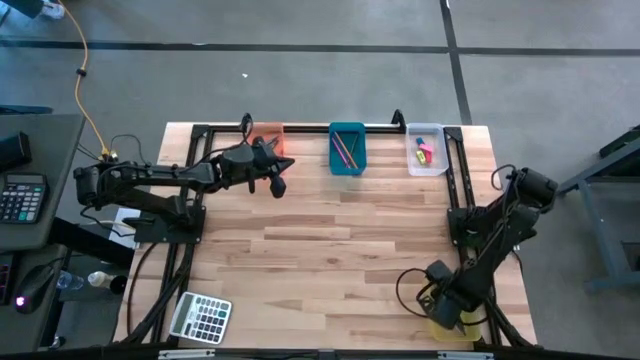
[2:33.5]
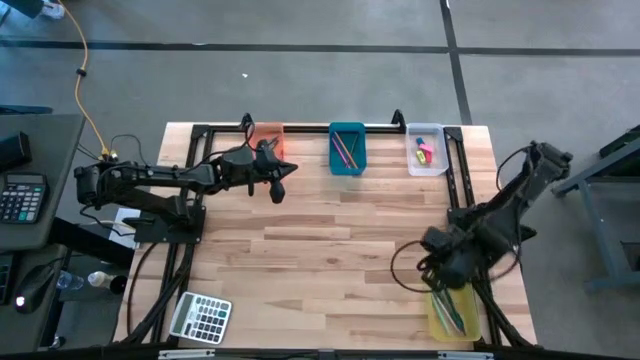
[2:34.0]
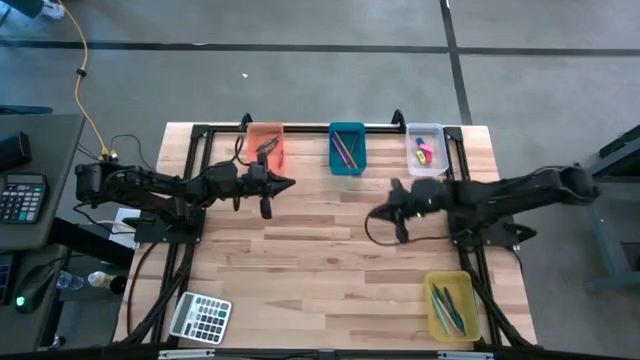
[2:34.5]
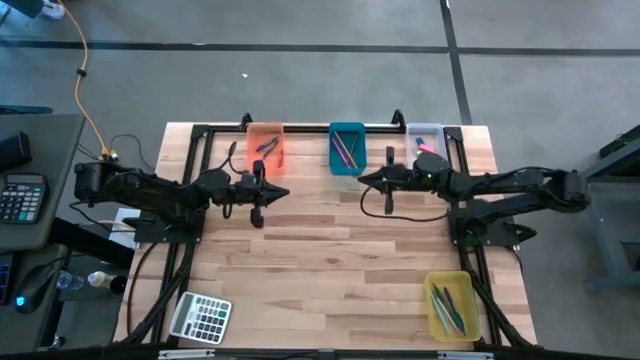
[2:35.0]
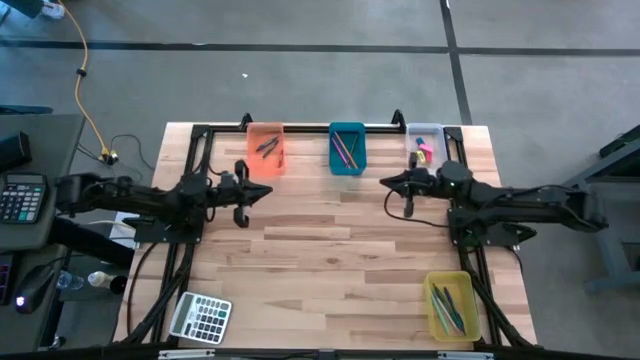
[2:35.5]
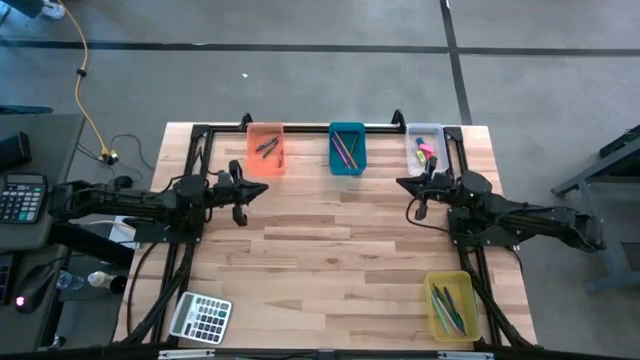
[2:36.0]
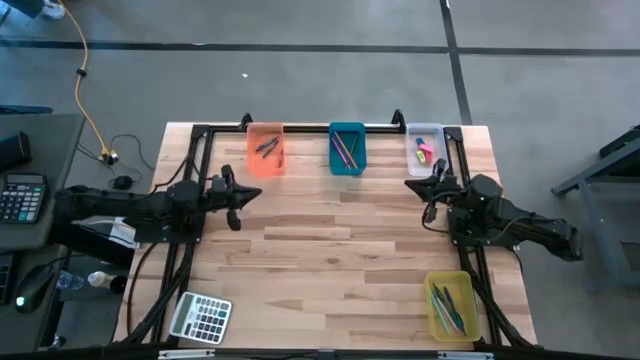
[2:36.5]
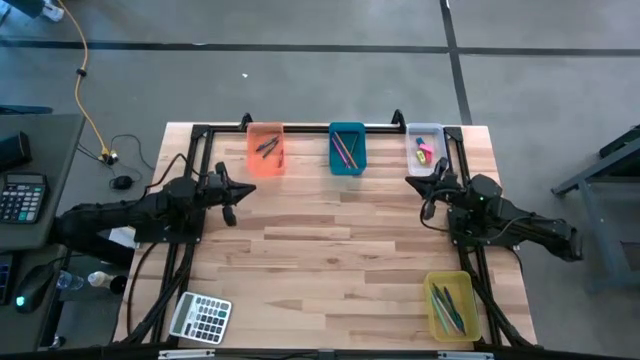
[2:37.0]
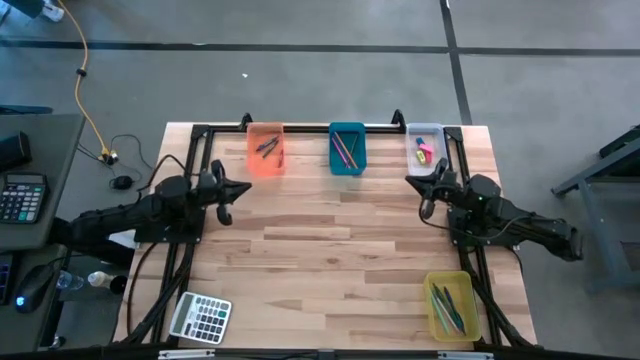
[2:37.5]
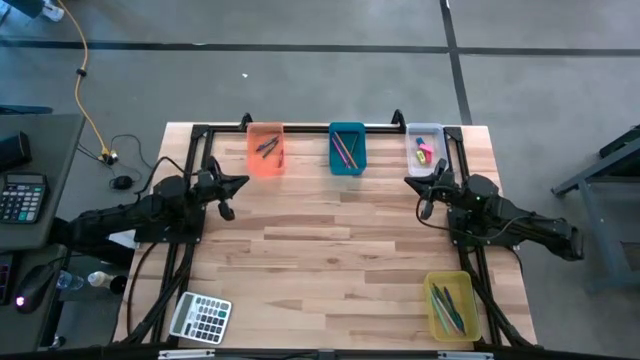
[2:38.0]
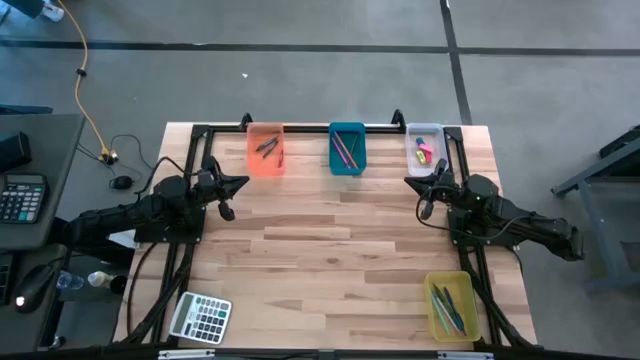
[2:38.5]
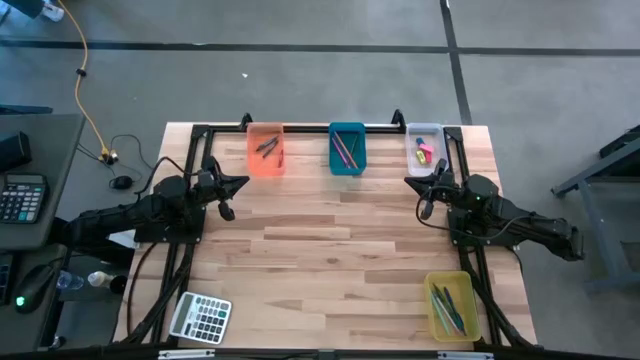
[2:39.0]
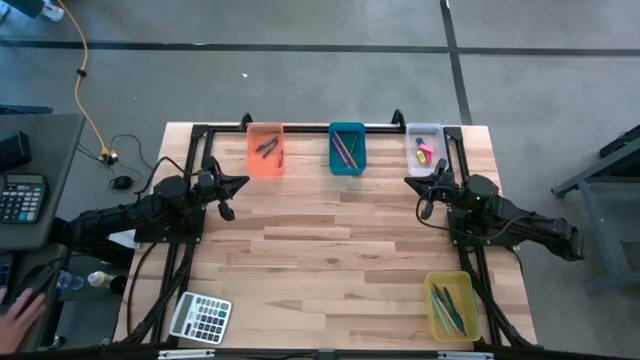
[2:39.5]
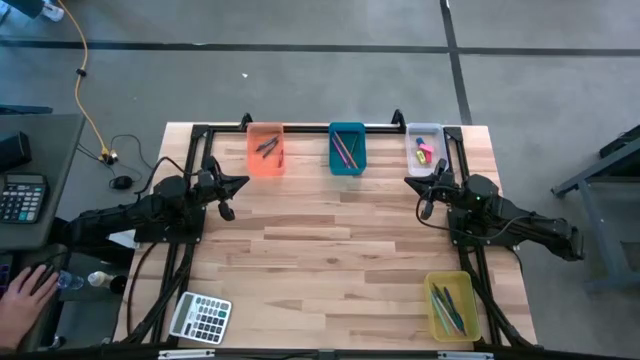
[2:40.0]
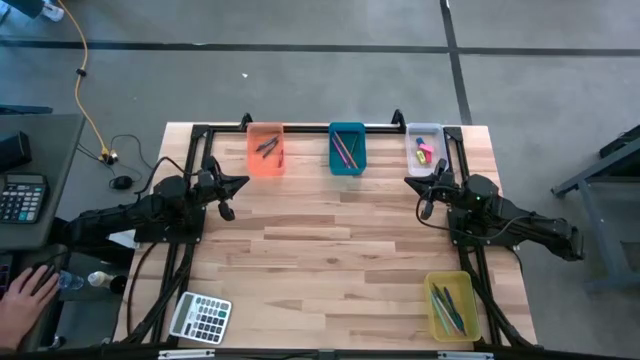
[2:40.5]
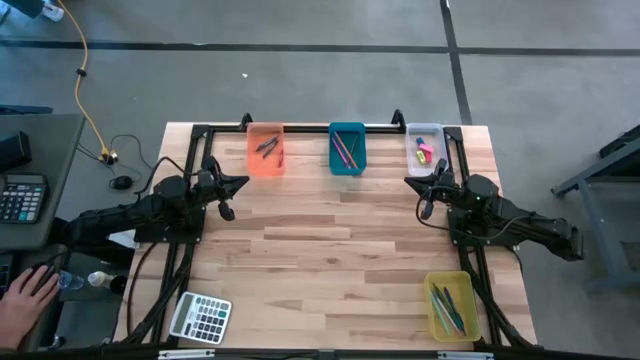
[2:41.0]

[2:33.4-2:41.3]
Task: Sort crayons/erasers/pens/pencils in bins
Return to Home Position

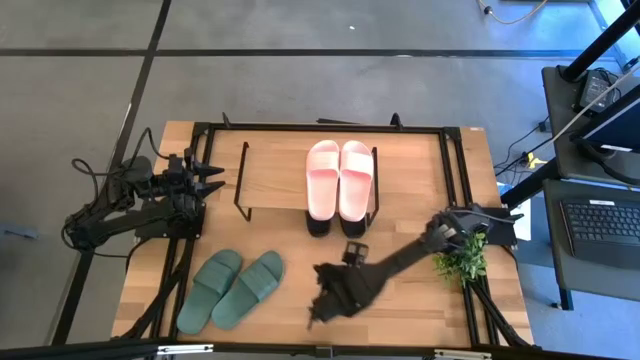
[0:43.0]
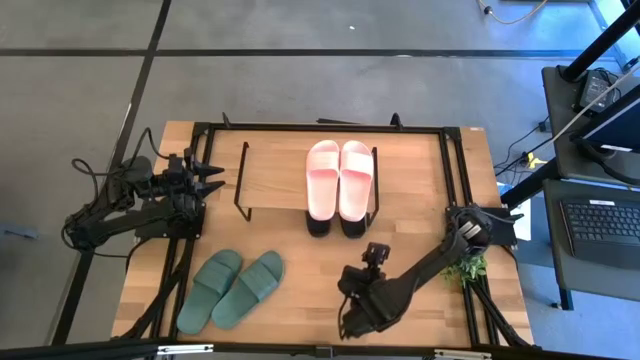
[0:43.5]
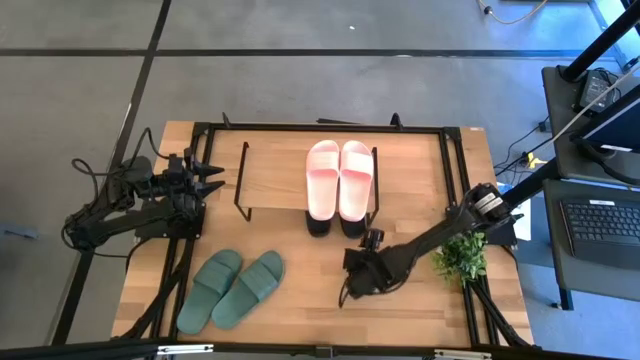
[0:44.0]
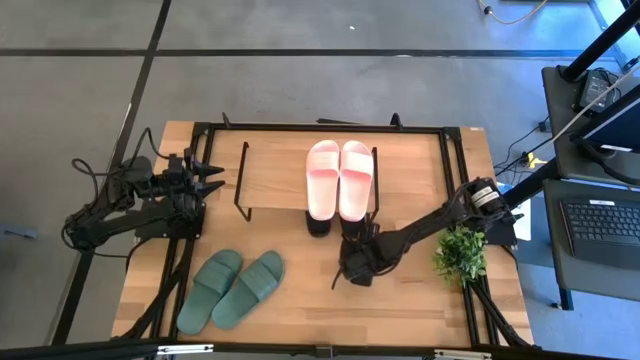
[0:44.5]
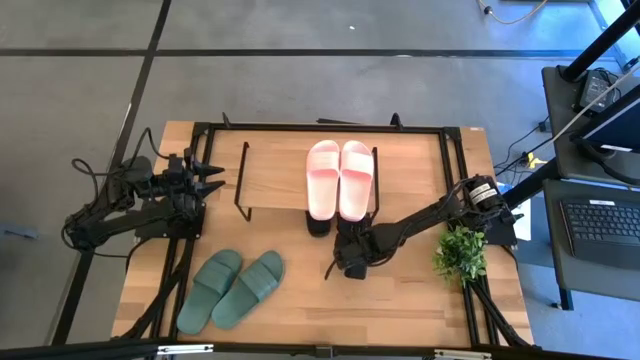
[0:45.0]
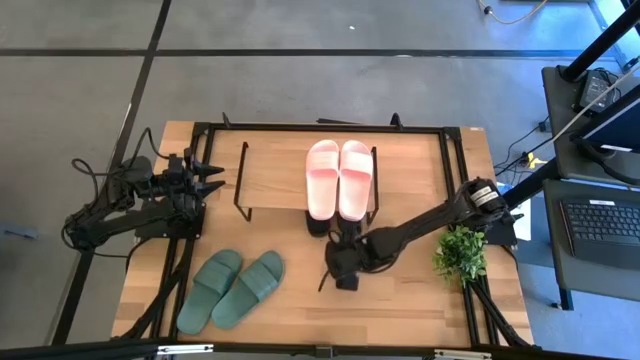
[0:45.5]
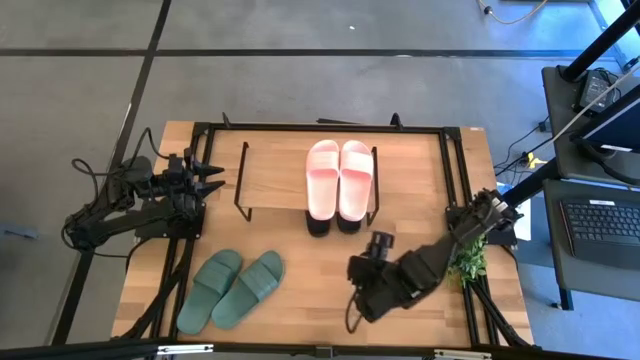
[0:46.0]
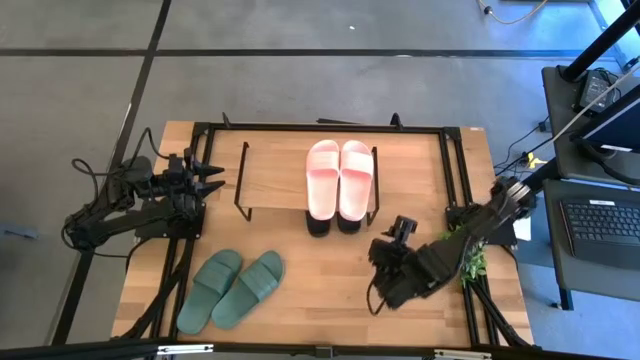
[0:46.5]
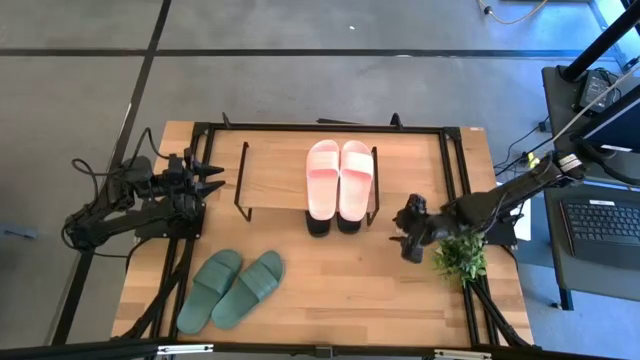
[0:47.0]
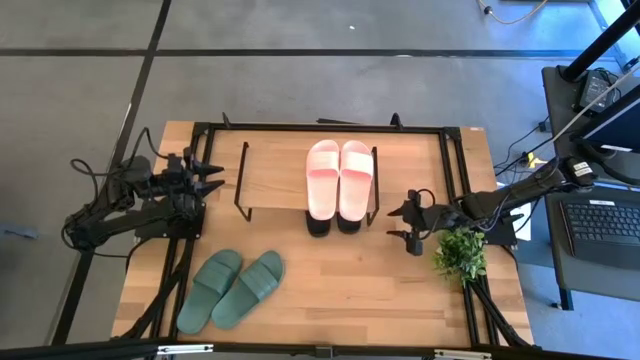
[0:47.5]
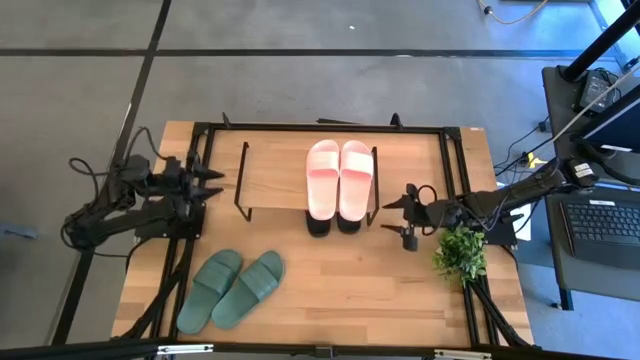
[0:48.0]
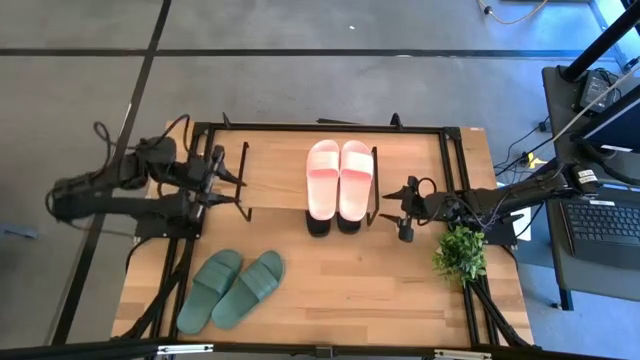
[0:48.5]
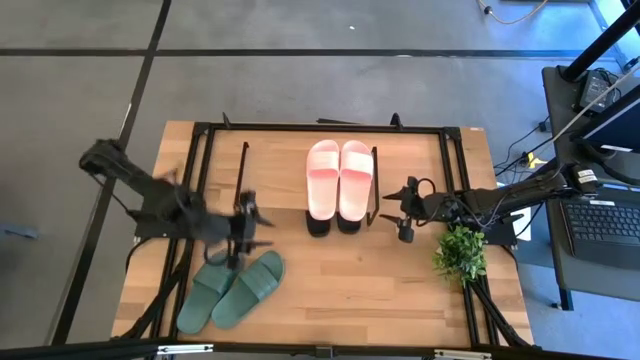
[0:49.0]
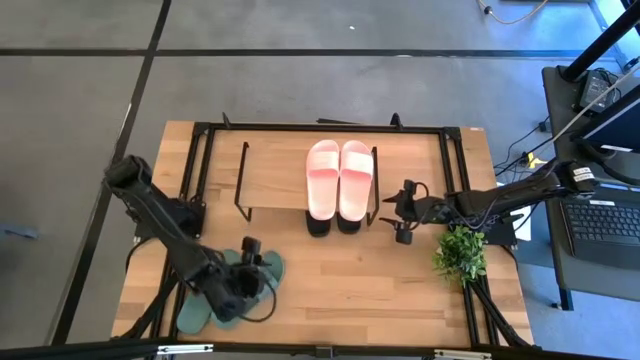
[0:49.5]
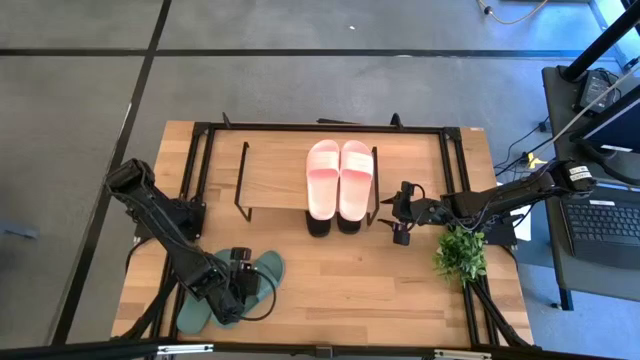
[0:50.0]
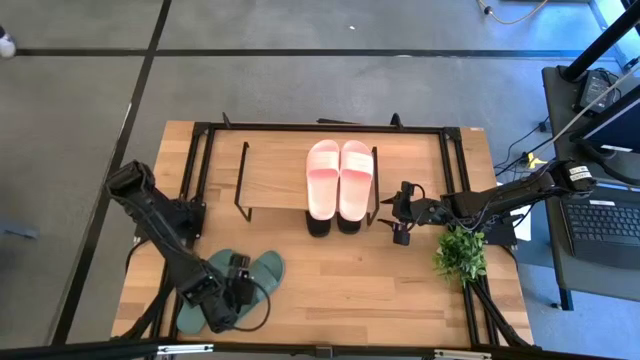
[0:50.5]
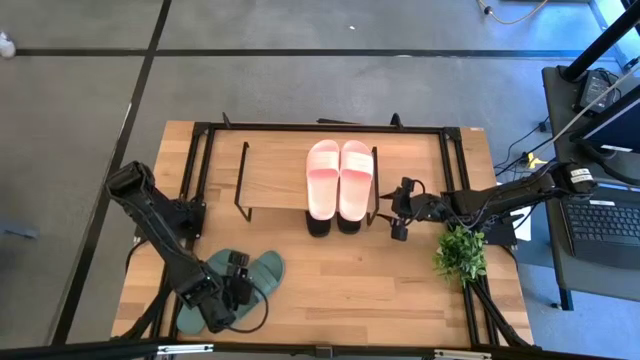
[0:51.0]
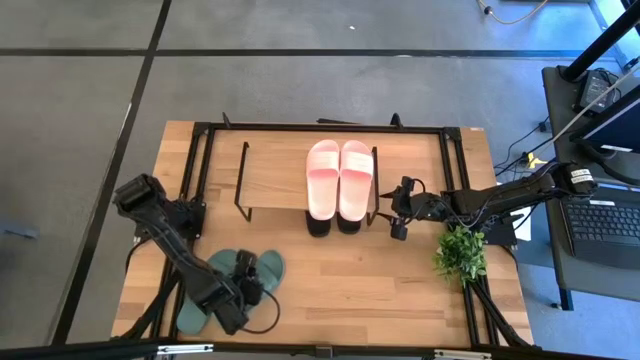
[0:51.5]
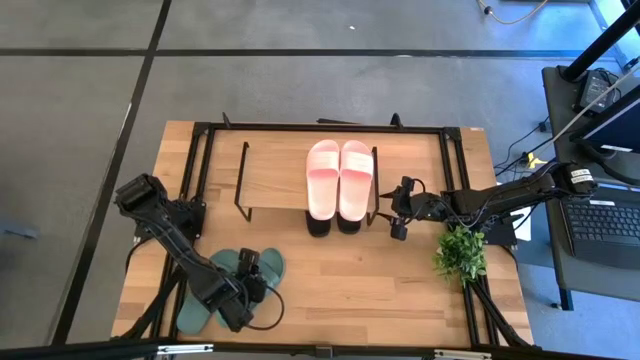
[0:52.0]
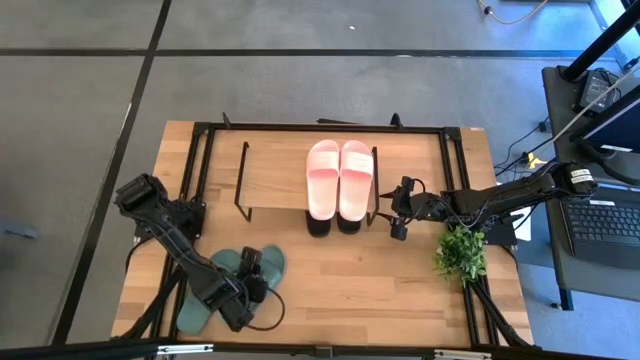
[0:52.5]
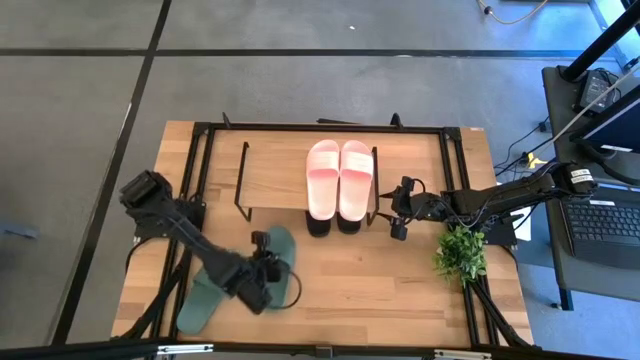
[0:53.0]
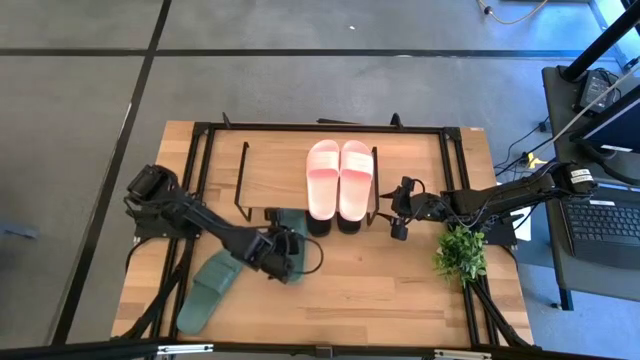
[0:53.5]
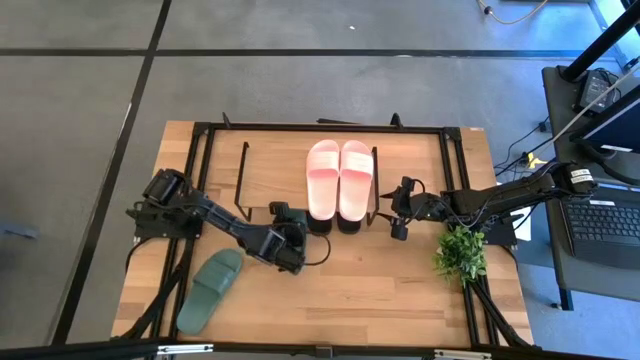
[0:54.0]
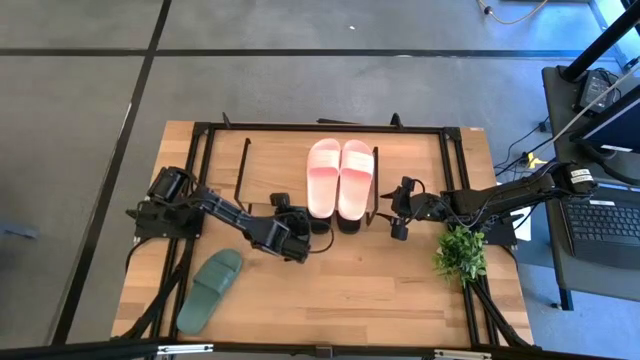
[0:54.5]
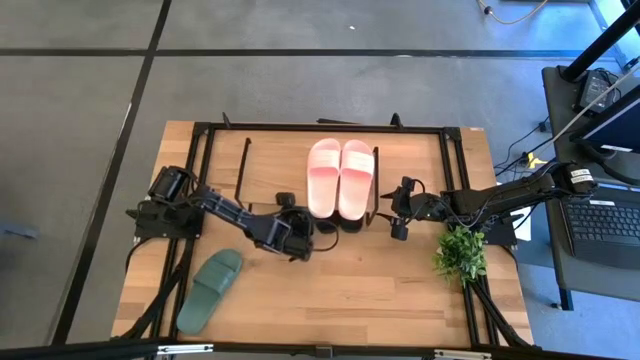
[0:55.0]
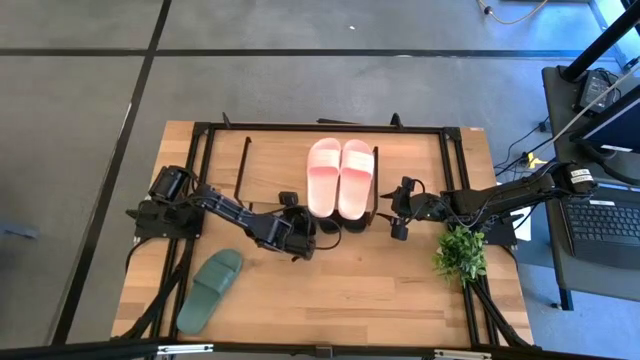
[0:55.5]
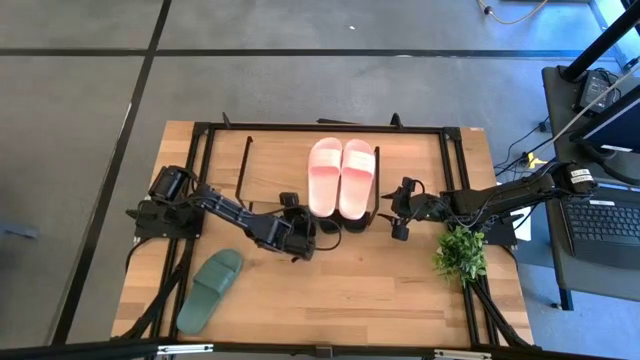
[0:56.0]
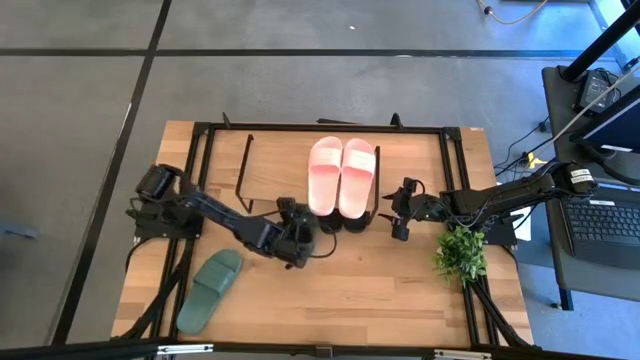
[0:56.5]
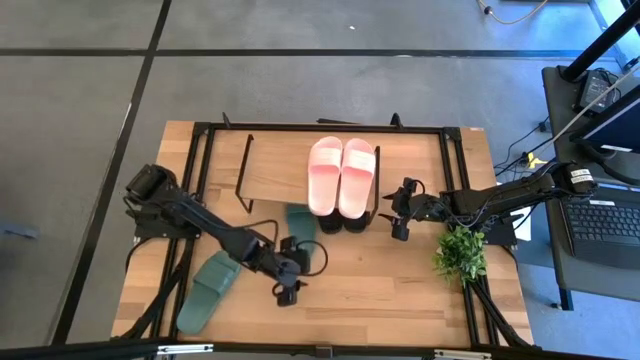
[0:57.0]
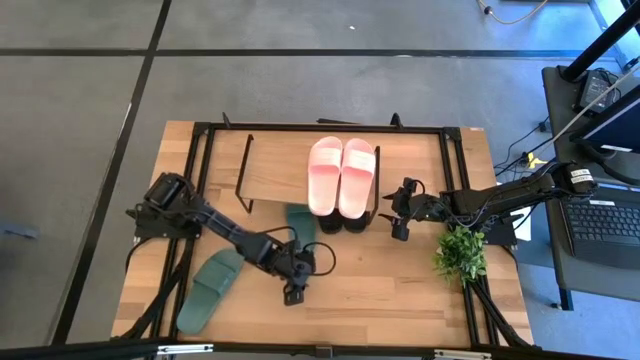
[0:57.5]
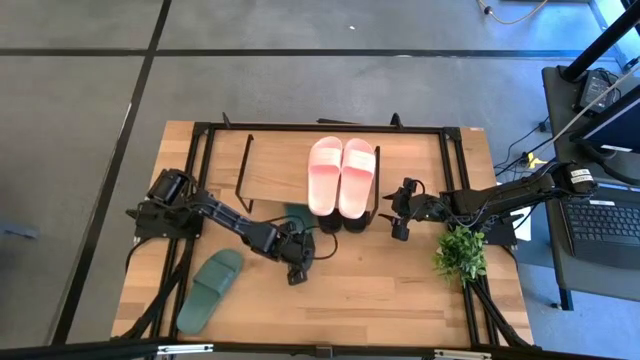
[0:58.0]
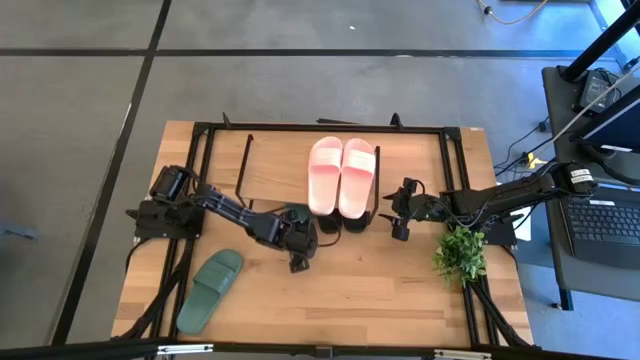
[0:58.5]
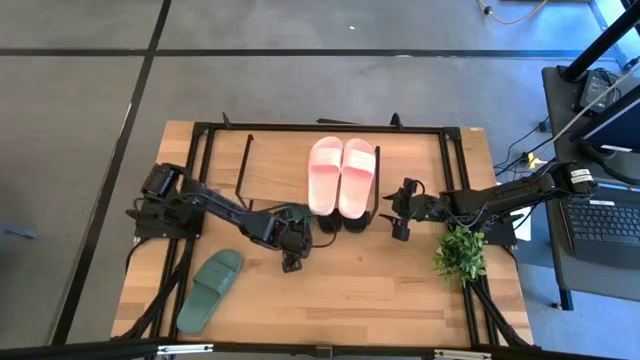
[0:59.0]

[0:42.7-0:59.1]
Task: Pick and place slides into the shelf
Put the right green slide under the shelf
